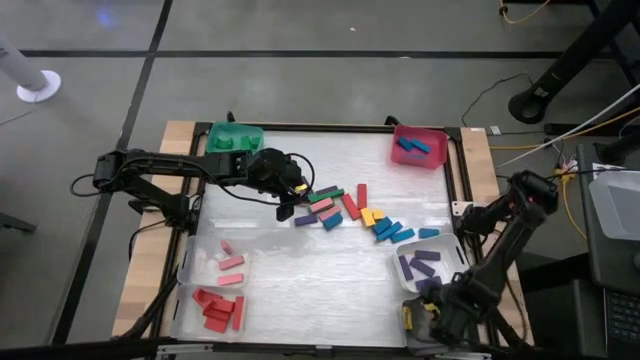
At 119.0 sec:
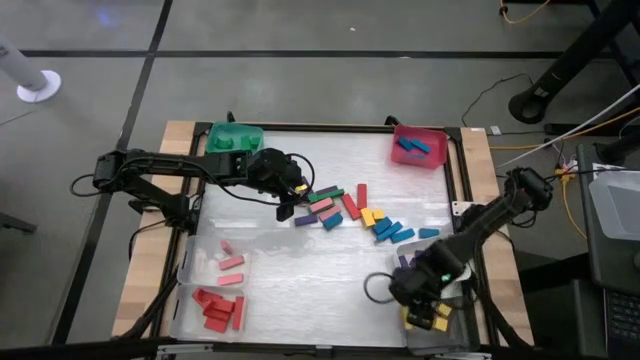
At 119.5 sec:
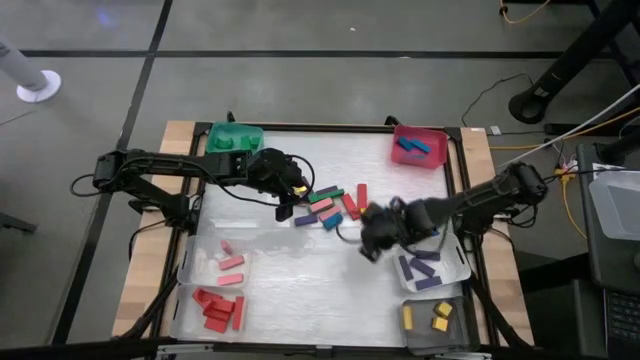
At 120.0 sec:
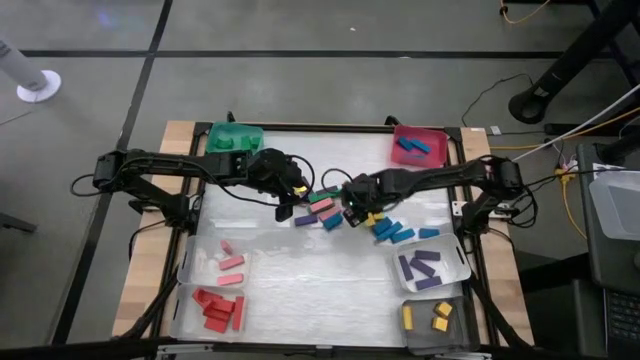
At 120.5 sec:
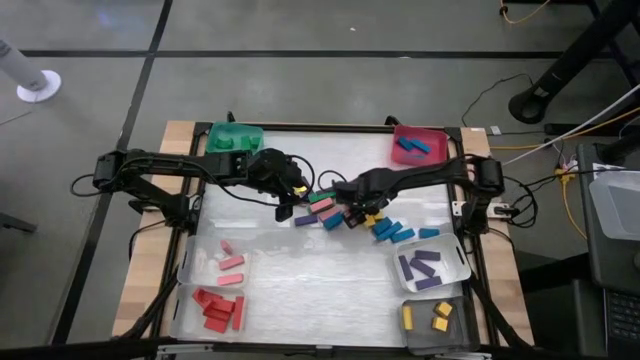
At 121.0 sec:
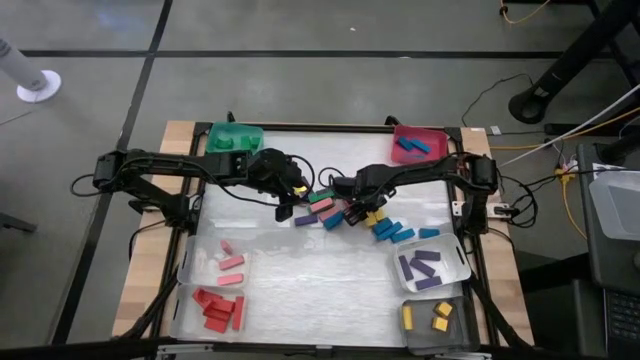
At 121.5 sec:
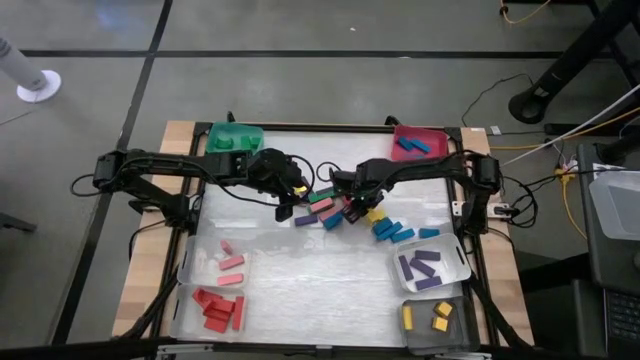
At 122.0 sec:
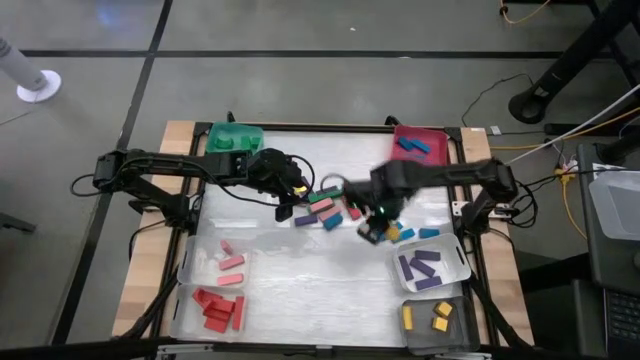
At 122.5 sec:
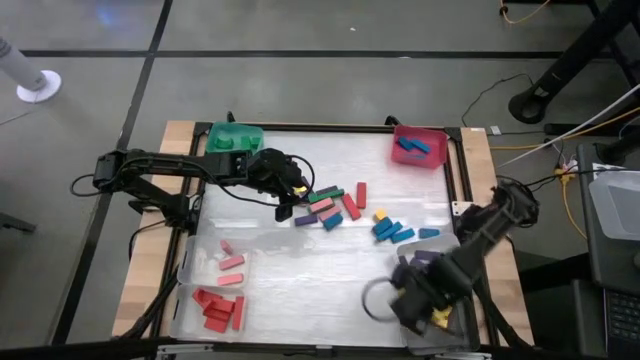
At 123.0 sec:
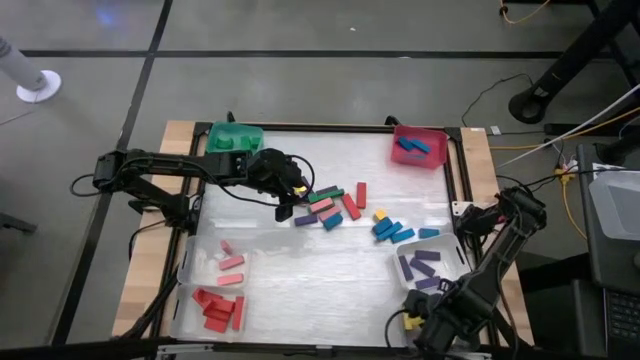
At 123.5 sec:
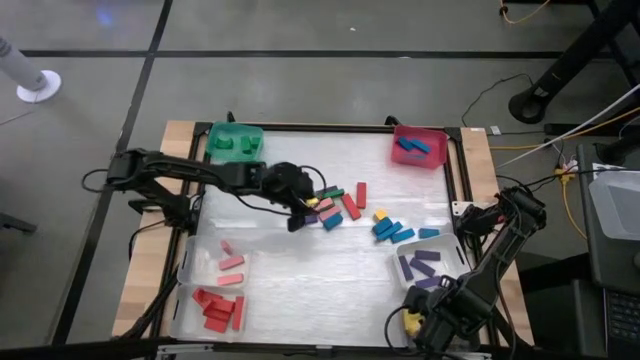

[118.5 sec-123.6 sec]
Task: Sort blocks
Put the yellow block into the black bin

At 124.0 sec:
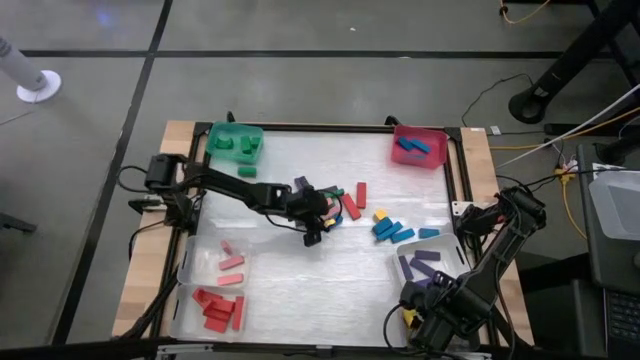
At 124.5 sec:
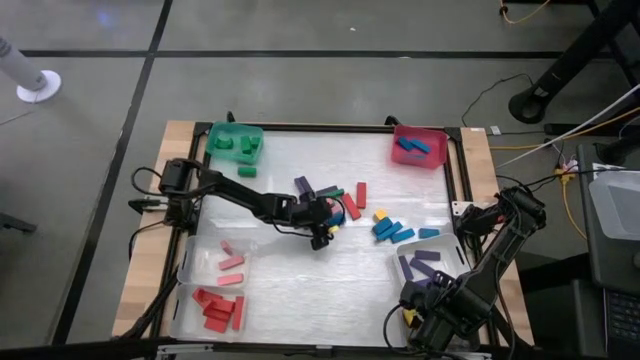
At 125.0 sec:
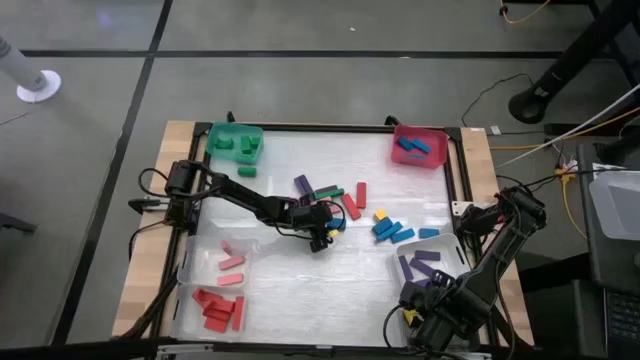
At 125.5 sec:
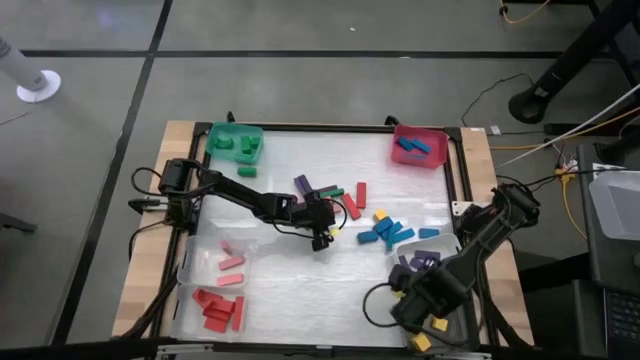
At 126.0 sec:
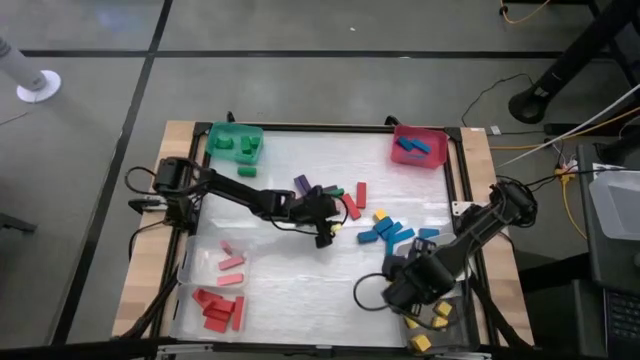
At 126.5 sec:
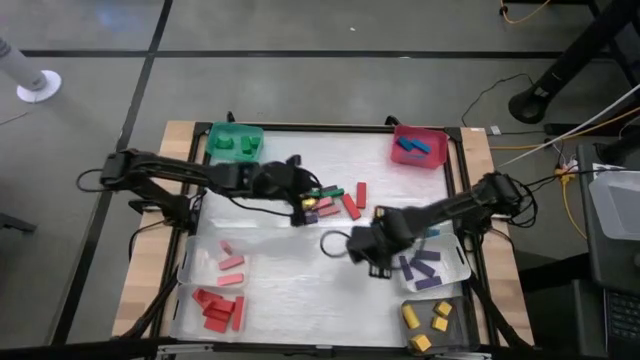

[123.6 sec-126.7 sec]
Put the blue block into the pink bin

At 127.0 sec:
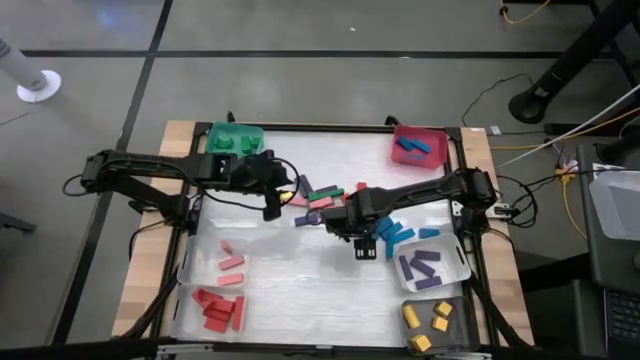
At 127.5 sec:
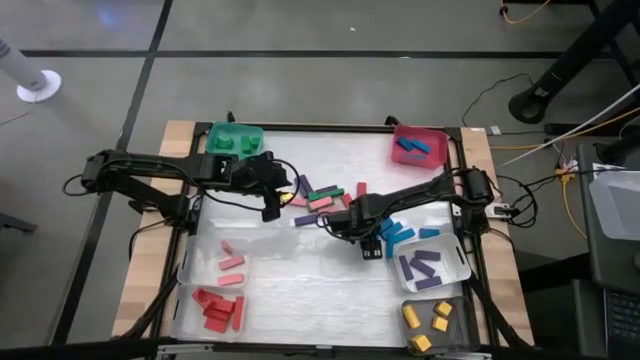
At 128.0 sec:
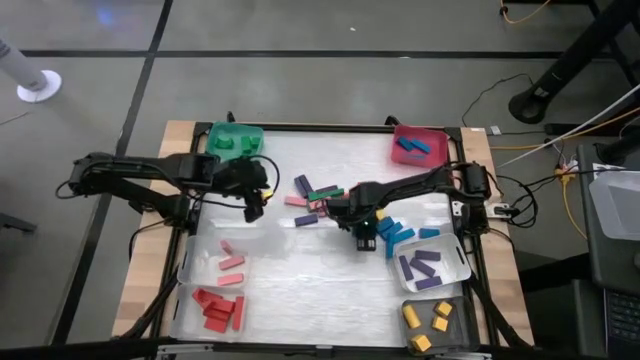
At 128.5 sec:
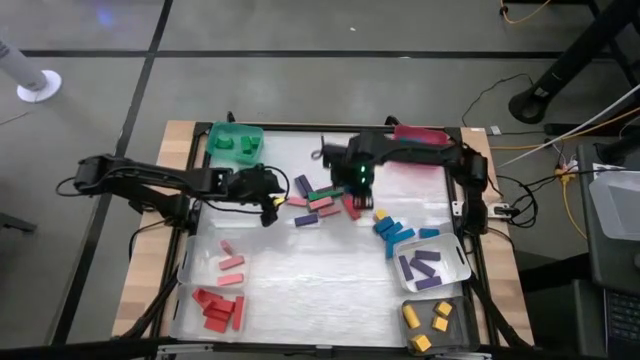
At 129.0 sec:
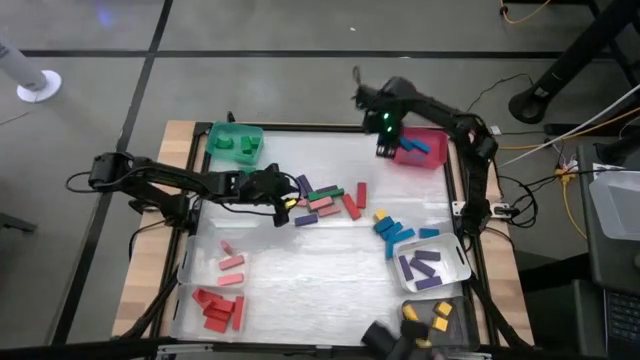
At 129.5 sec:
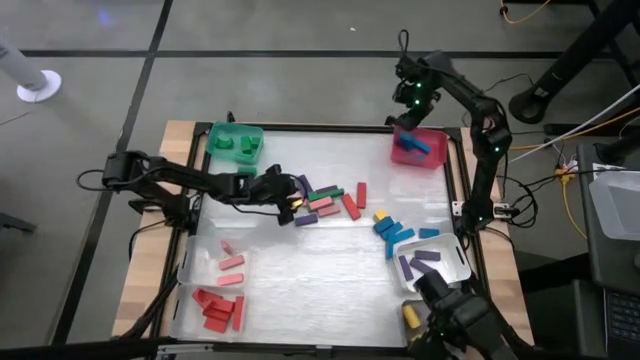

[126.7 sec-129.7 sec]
Put the blue block into the pink bin

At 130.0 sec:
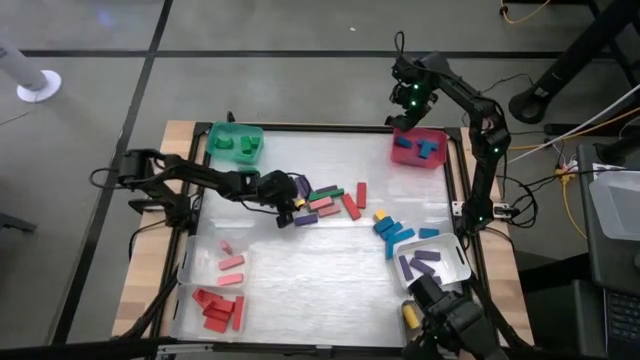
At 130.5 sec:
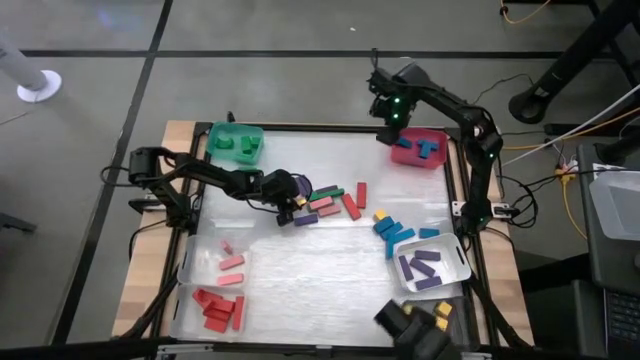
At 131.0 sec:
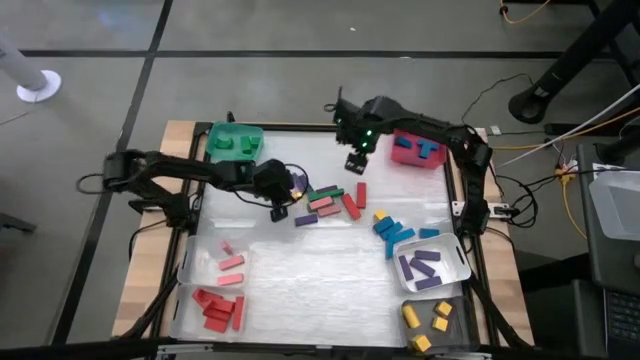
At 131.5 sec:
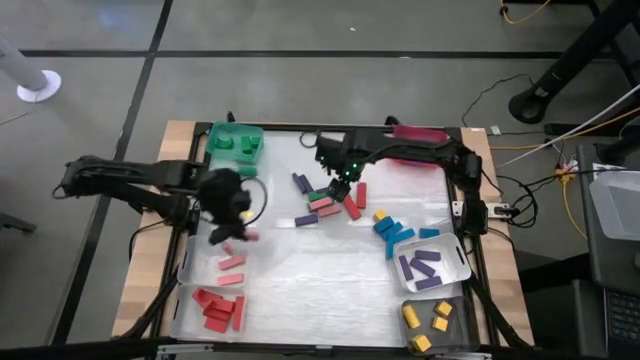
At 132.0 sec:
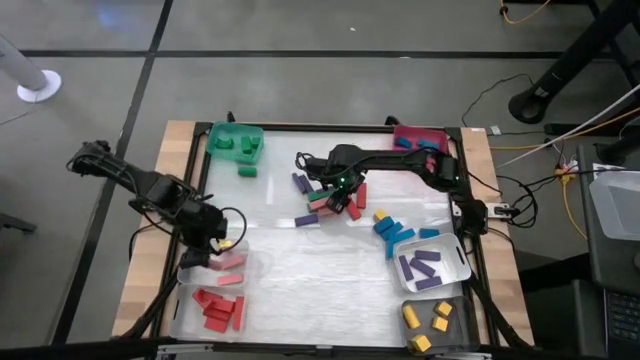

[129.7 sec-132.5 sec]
Put the pink block into the top transparent bin

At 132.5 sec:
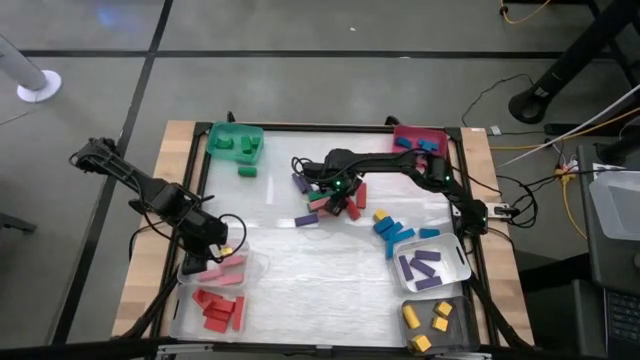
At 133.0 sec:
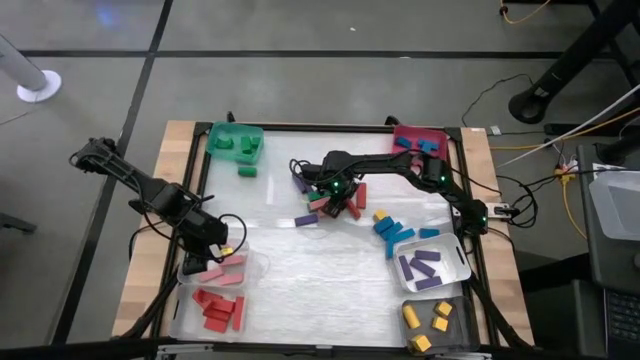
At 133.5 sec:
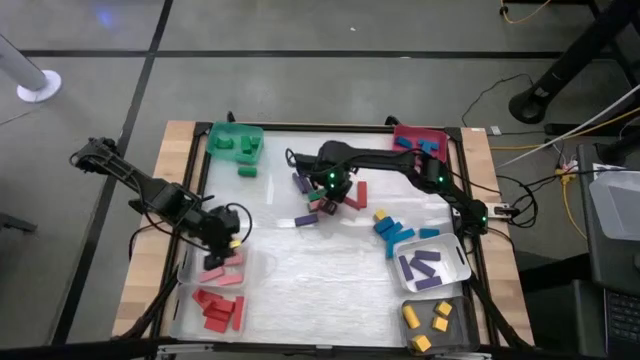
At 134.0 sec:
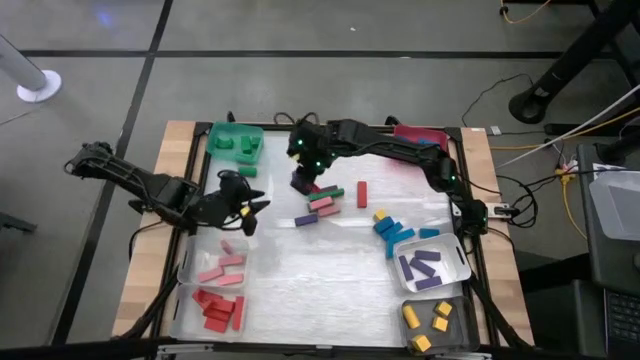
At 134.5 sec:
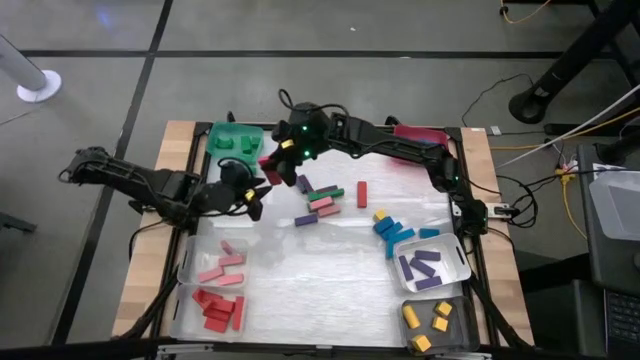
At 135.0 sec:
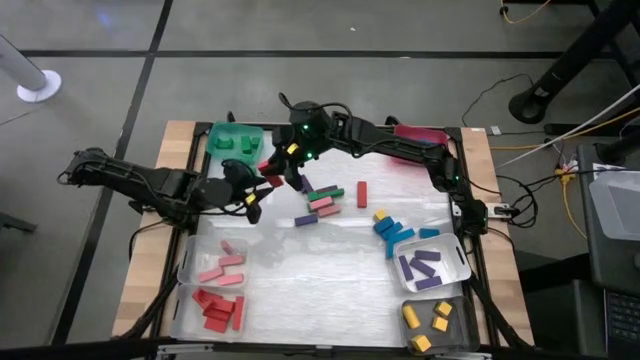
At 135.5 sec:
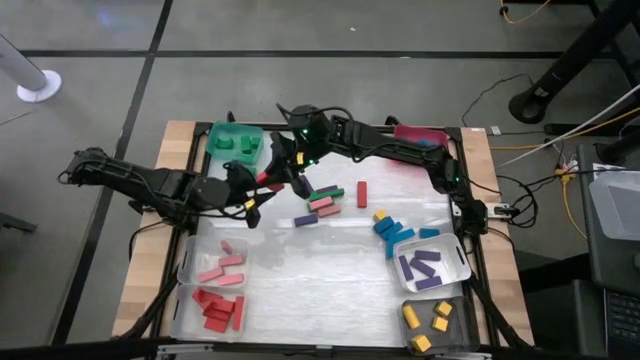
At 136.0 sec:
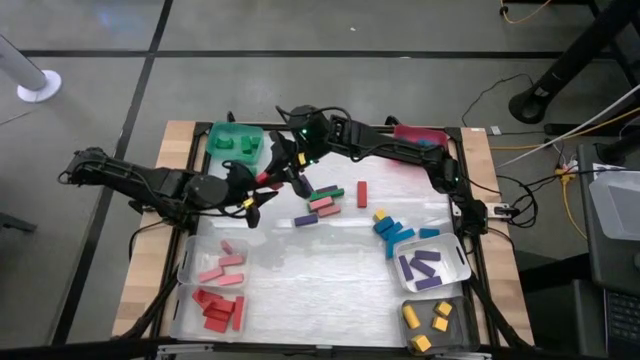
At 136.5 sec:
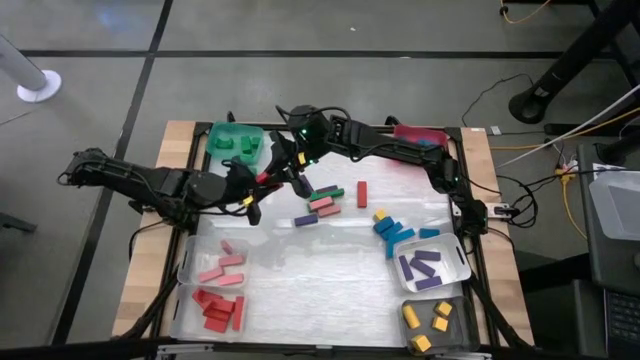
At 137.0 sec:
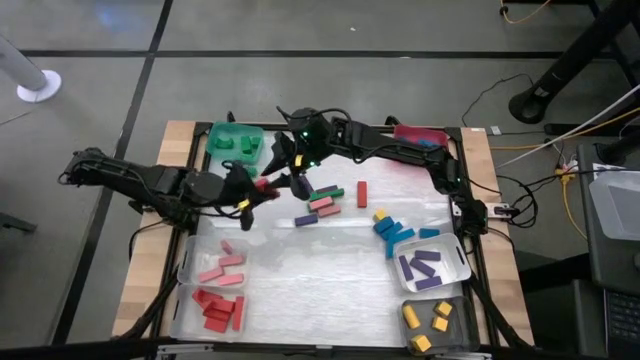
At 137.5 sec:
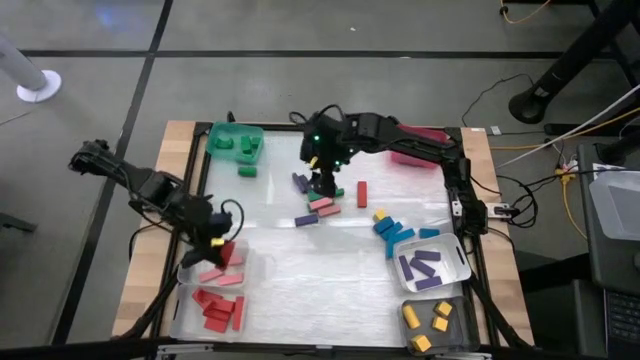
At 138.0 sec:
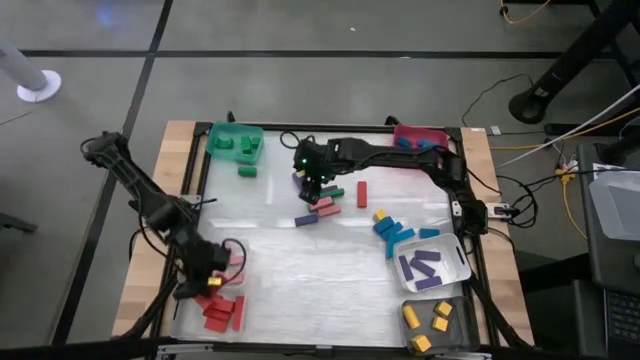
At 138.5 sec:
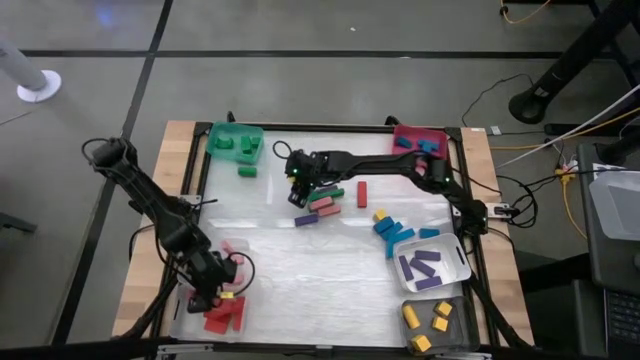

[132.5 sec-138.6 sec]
Put the red block into the bottom transparent bin

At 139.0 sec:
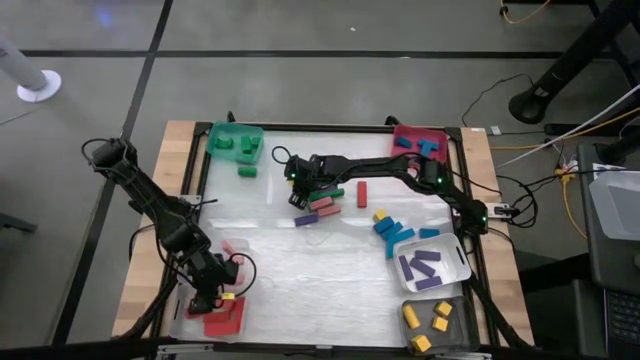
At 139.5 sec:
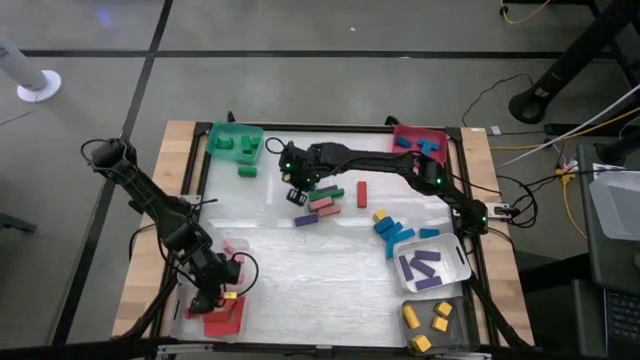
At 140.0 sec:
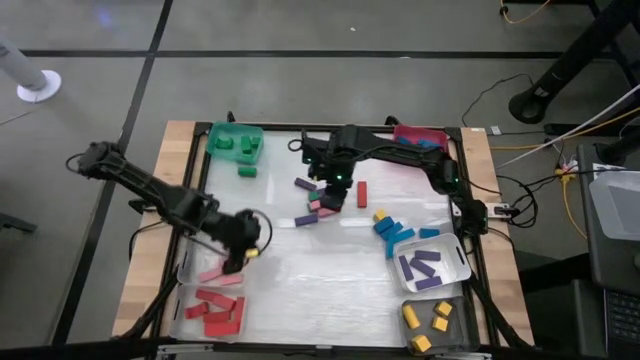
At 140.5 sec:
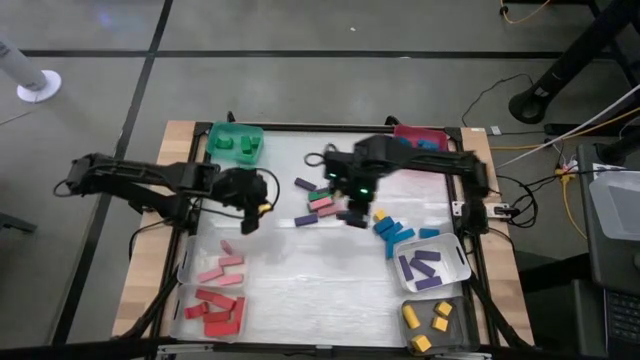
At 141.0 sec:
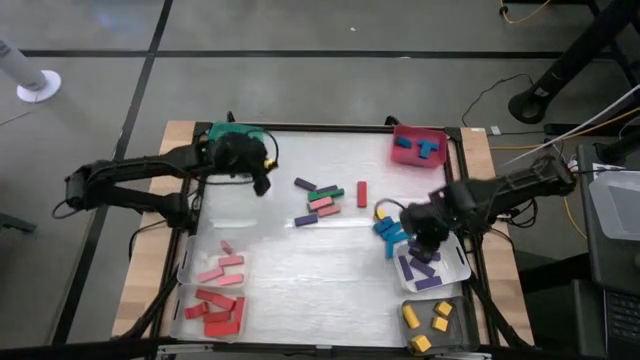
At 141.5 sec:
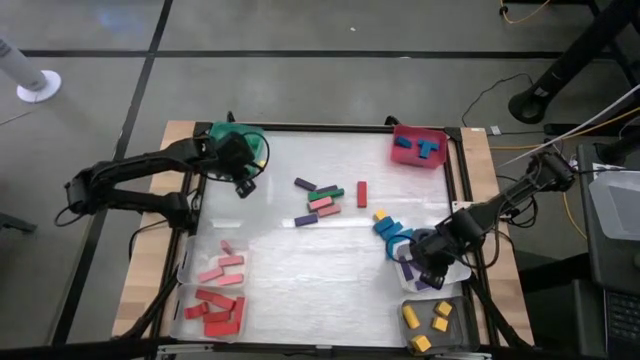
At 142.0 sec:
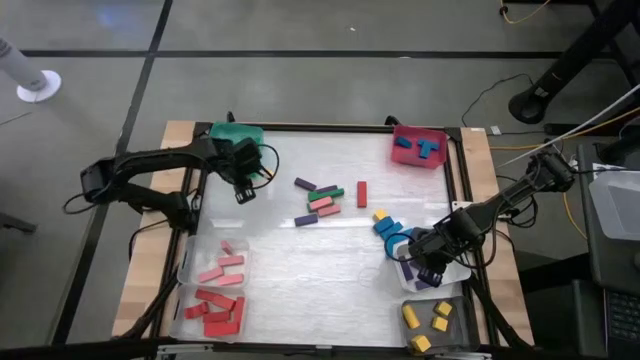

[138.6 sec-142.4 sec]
Put the violet block into the white bin
